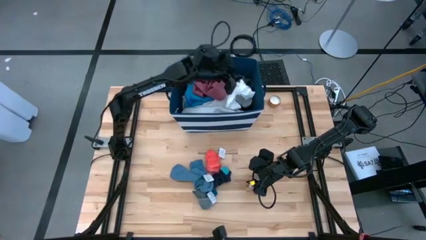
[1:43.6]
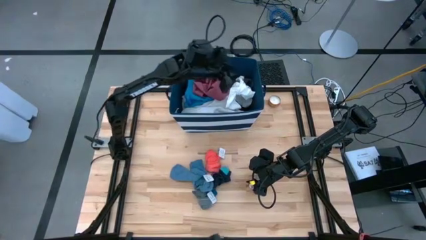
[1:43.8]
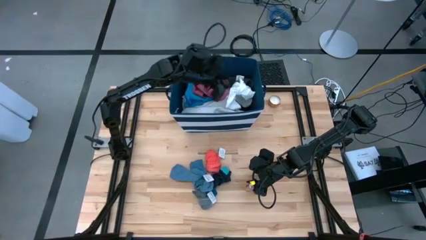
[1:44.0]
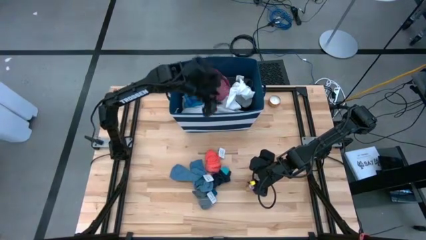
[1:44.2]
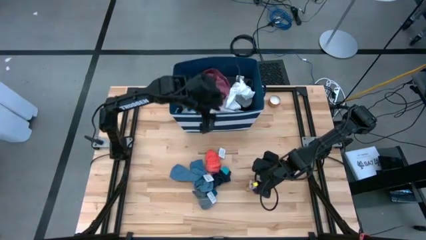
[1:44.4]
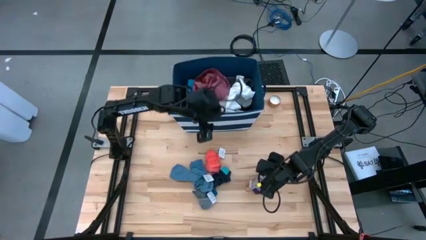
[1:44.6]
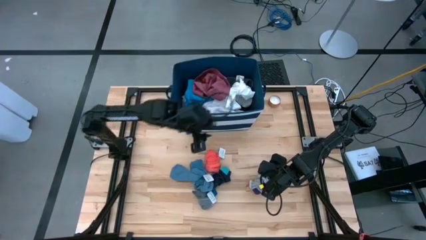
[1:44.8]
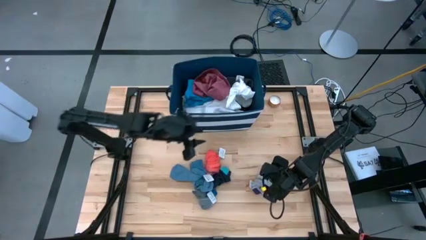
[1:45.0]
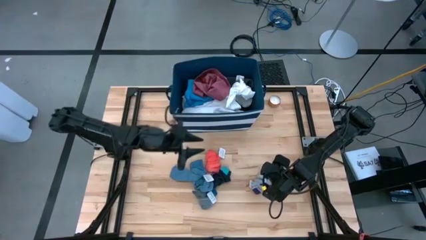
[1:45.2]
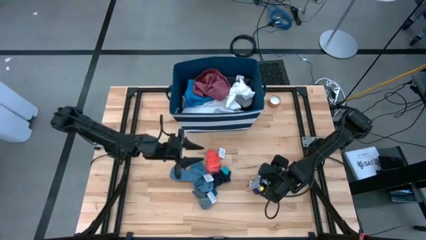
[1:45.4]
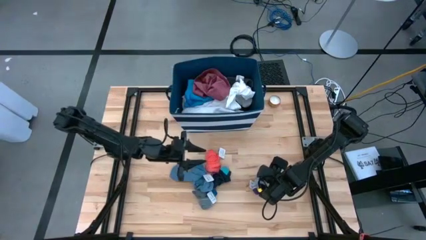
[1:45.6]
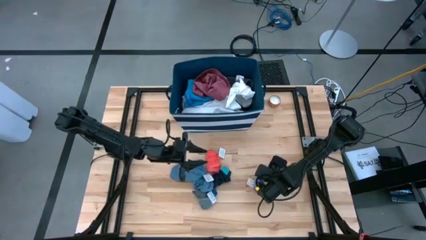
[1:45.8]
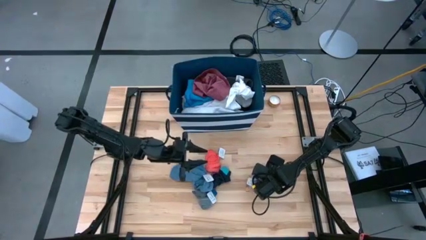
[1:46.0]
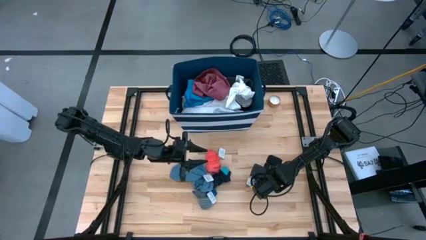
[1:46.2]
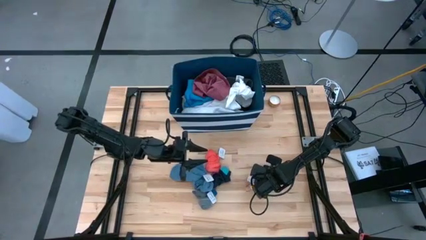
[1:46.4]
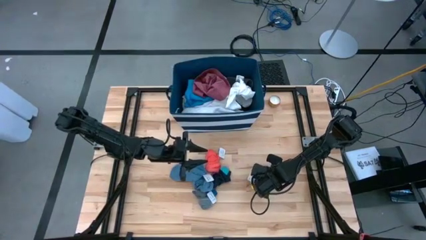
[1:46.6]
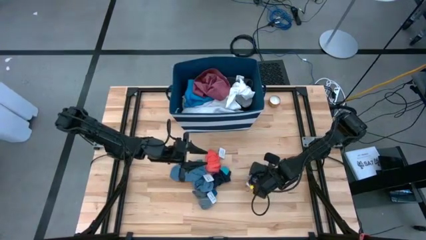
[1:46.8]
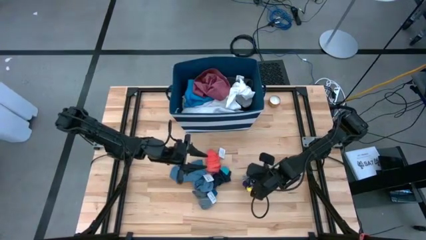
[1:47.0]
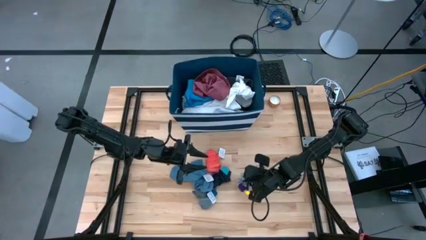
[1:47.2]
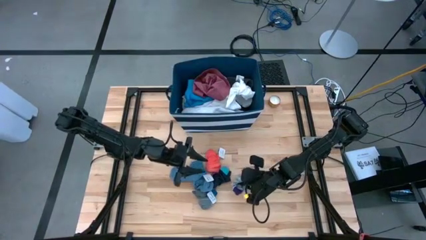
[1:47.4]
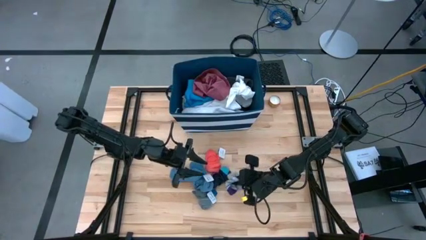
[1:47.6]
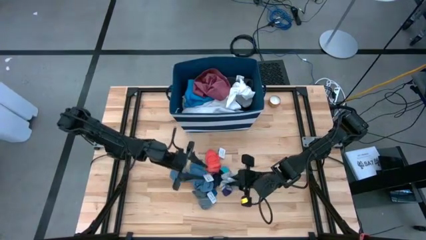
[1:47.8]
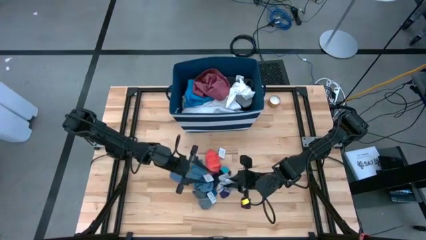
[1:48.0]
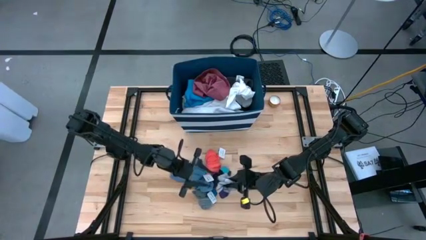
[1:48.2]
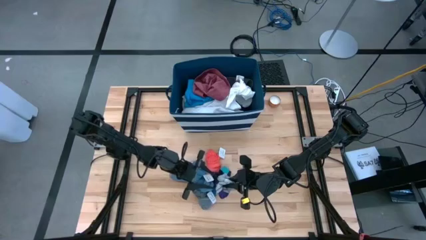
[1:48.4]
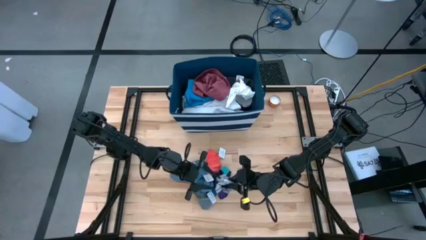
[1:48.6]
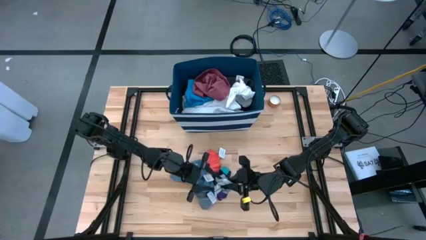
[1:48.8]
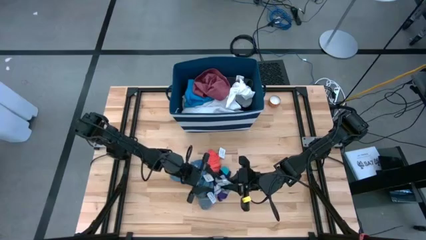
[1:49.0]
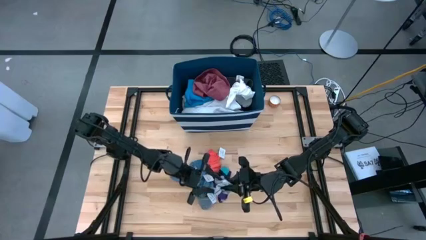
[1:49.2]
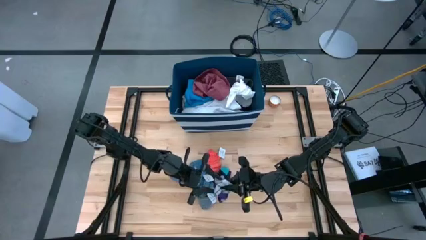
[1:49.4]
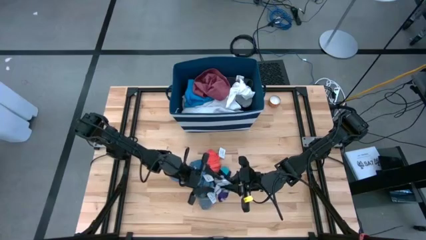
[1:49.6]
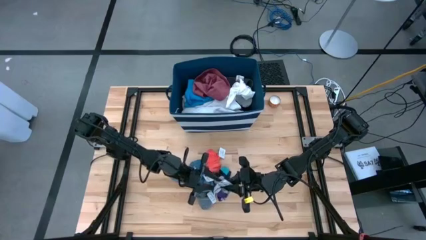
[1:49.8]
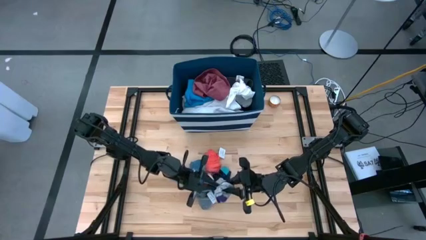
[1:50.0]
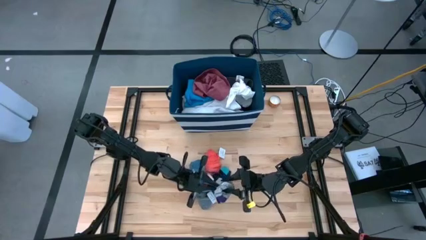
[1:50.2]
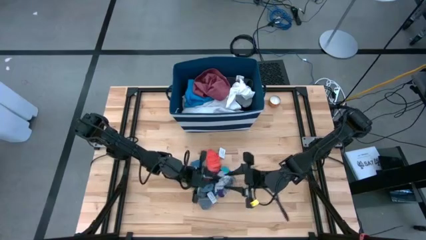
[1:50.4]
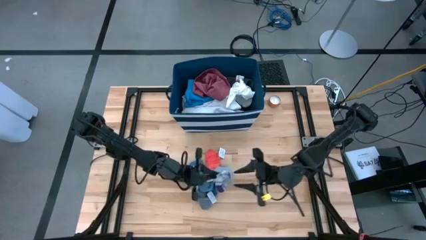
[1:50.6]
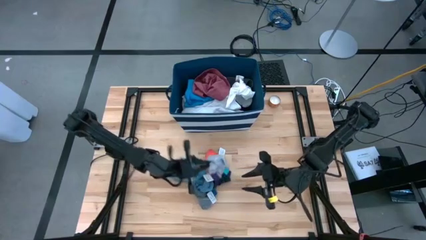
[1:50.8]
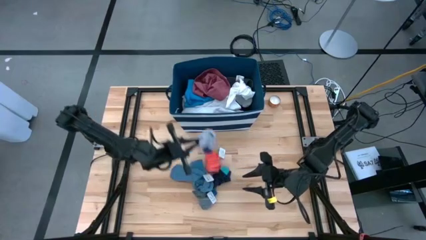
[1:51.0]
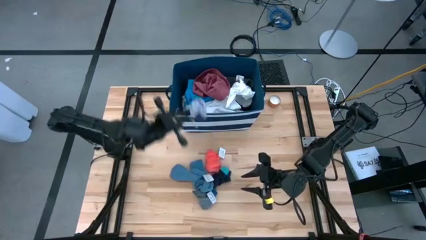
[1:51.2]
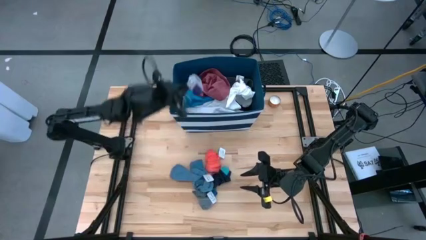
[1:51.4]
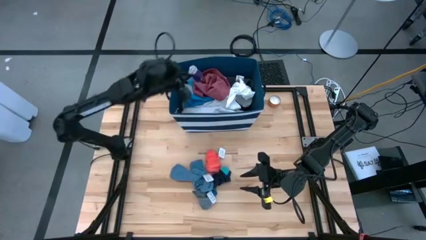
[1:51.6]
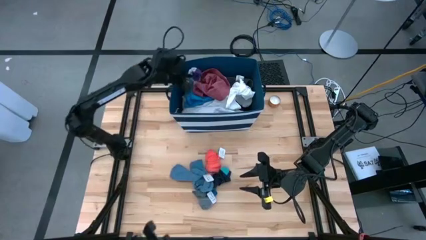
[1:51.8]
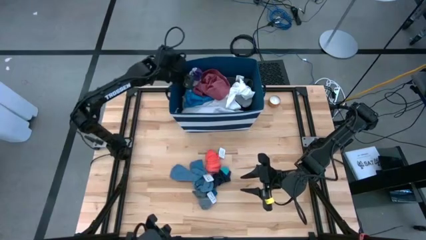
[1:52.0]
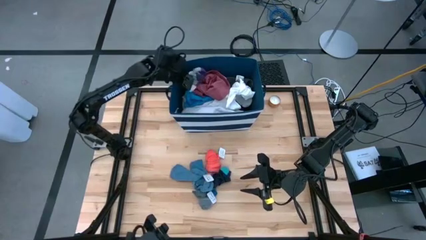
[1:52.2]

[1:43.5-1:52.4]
Task: Sort clothes
Put the gray pair of socks into the blue laundry organizer

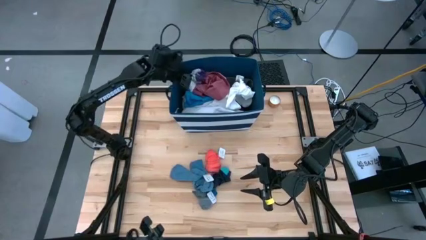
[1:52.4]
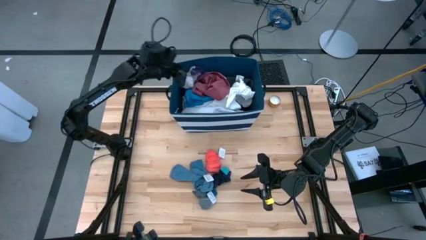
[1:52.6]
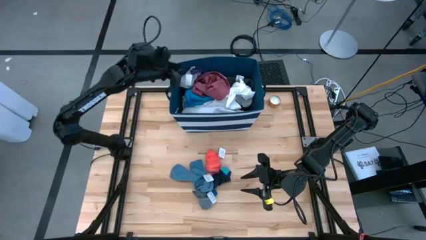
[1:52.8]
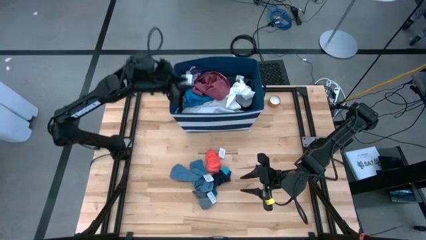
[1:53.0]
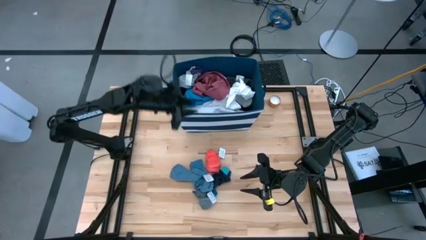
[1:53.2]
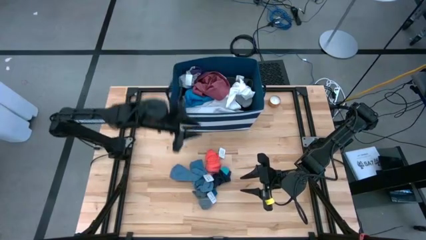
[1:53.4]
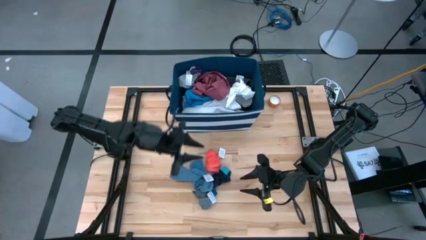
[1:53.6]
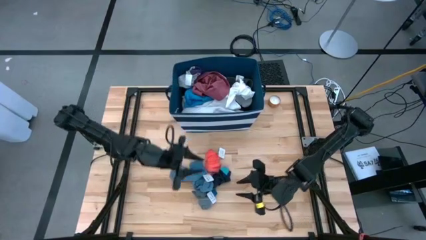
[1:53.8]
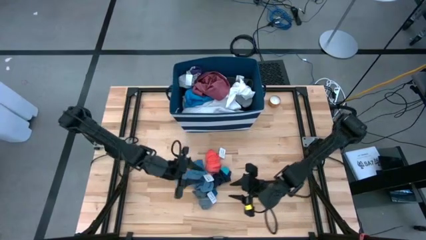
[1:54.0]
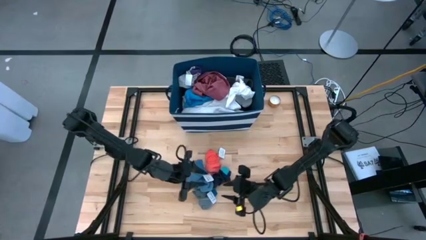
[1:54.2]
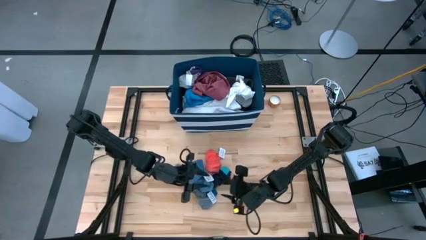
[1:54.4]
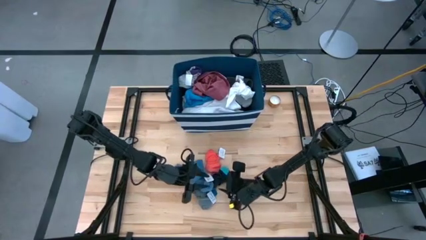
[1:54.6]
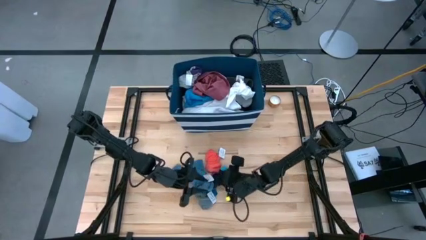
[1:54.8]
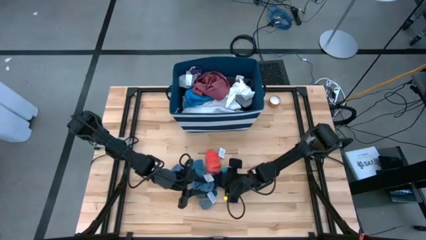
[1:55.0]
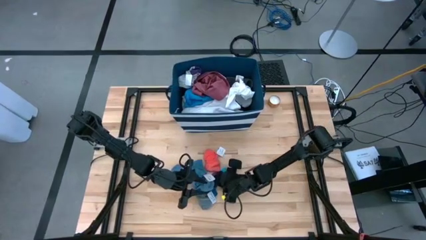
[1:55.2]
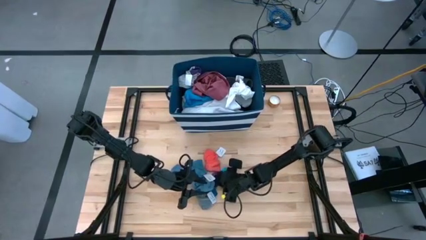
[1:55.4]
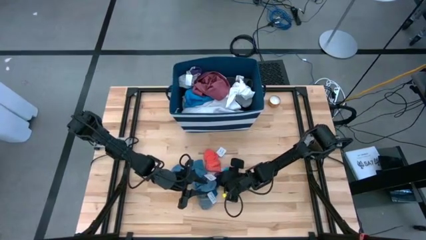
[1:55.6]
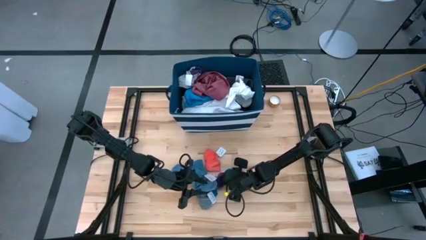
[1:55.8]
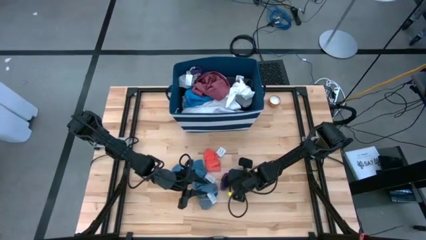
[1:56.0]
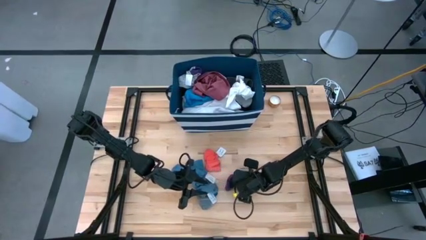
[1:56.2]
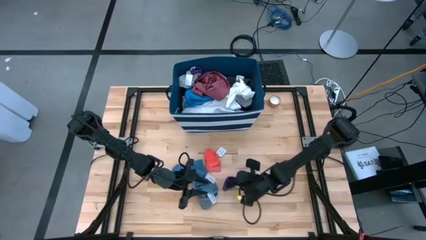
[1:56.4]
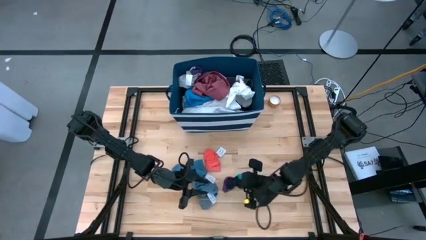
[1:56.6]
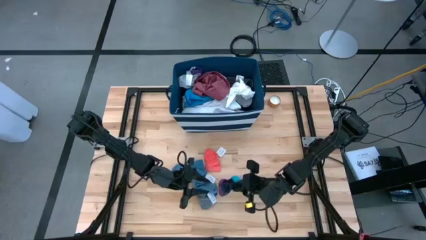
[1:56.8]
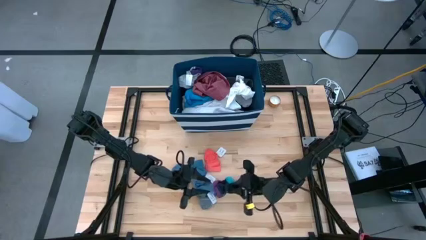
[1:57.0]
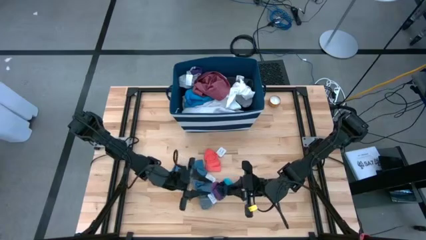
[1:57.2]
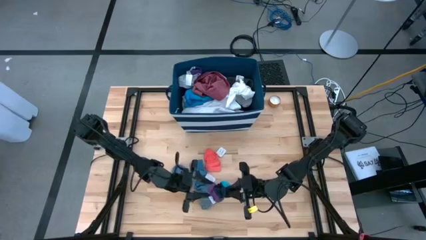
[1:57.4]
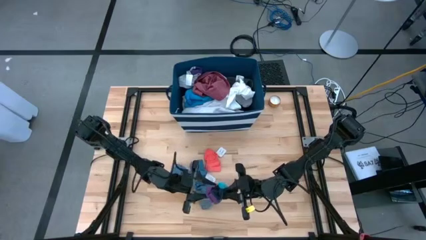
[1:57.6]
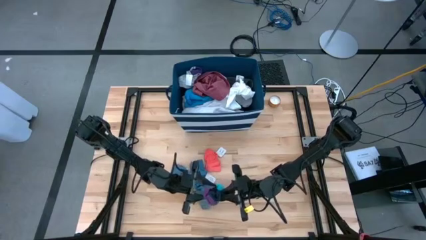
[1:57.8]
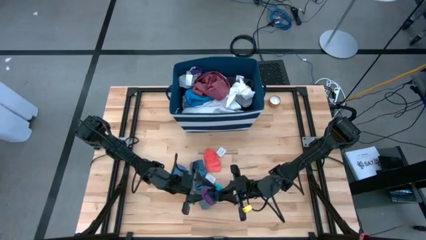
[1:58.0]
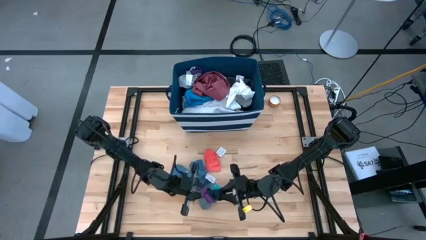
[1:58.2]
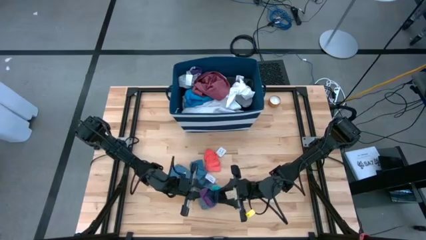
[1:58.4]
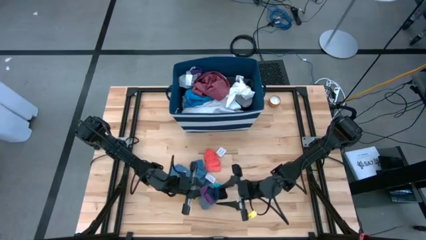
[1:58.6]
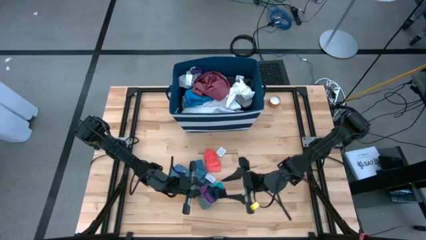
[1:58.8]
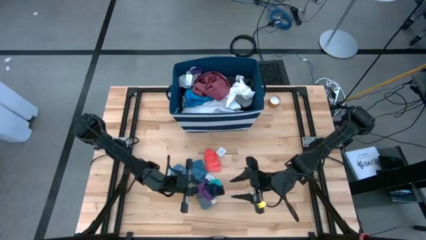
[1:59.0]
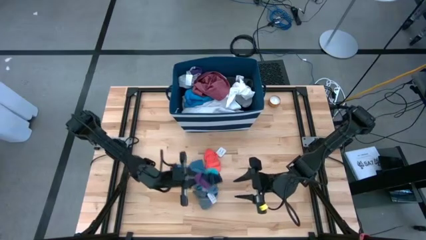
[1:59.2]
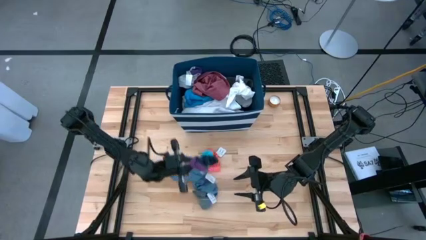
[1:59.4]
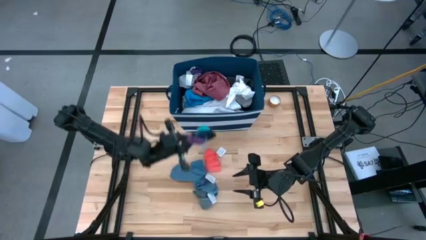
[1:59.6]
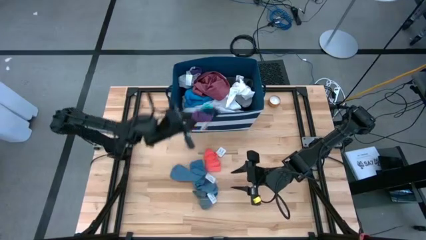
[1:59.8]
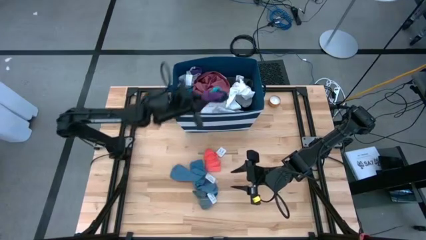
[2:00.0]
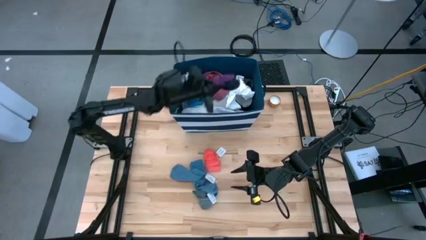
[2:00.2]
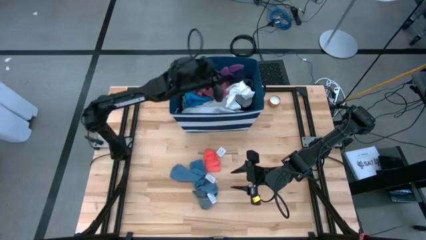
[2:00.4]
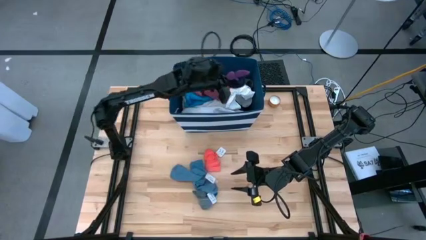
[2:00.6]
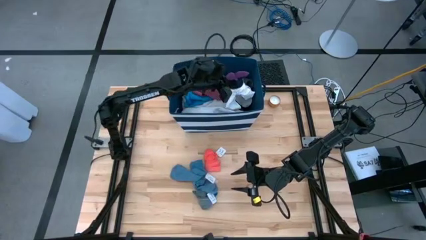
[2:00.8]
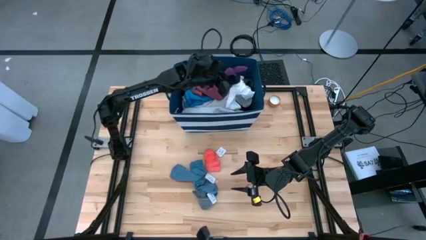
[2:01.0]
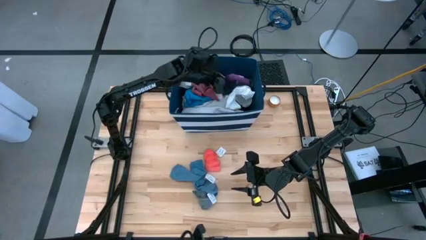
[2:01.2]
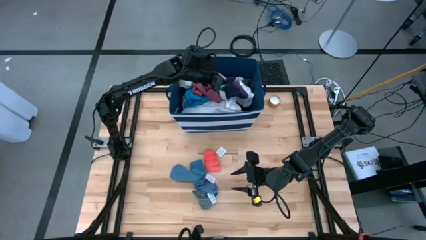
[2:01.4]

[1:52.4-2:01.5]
Put the dark blue pair of socks into the blue laundry organizer
